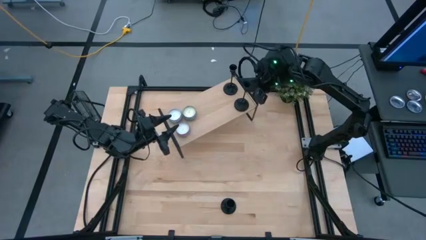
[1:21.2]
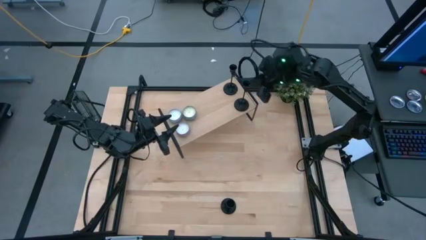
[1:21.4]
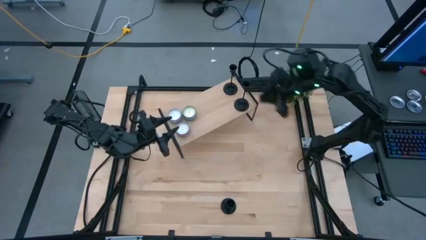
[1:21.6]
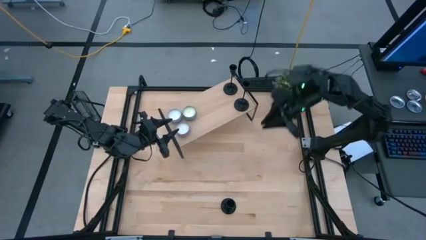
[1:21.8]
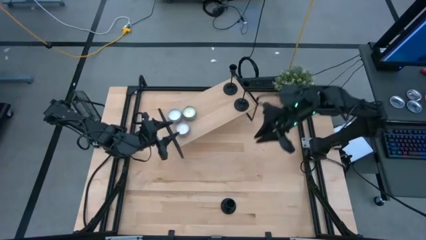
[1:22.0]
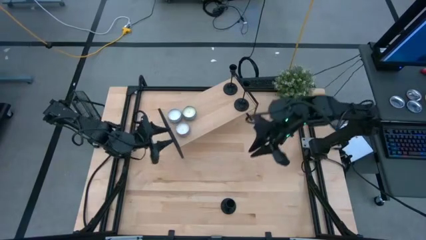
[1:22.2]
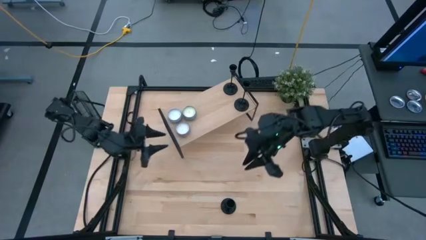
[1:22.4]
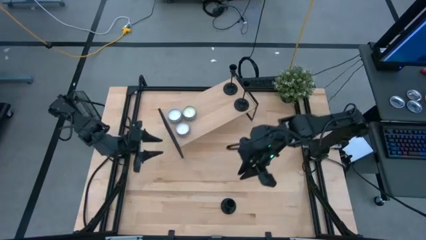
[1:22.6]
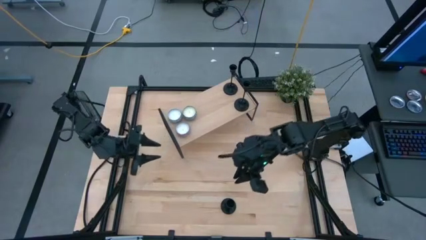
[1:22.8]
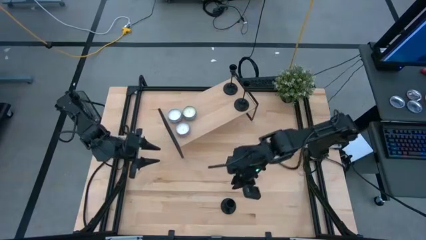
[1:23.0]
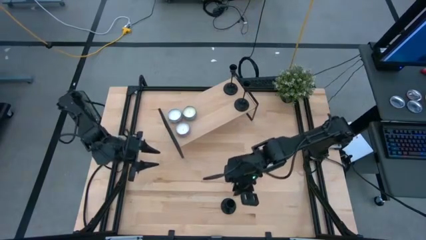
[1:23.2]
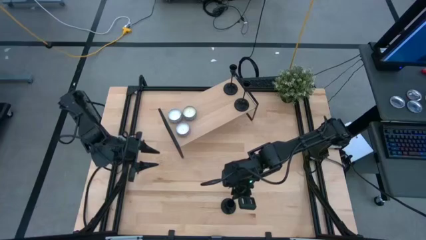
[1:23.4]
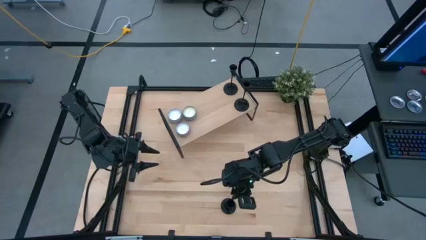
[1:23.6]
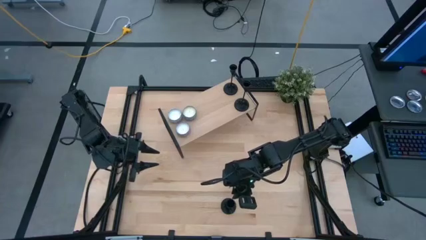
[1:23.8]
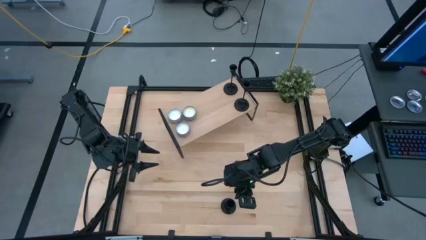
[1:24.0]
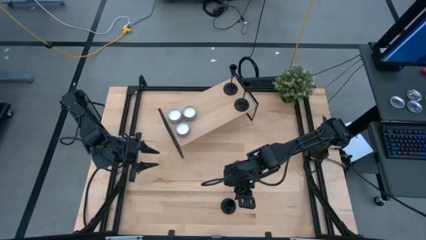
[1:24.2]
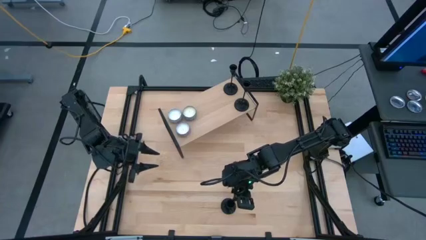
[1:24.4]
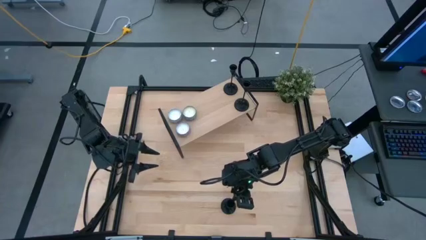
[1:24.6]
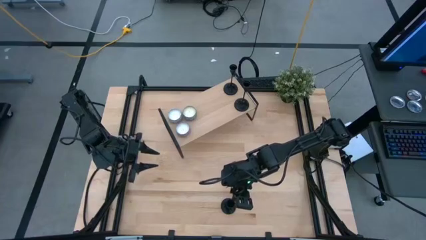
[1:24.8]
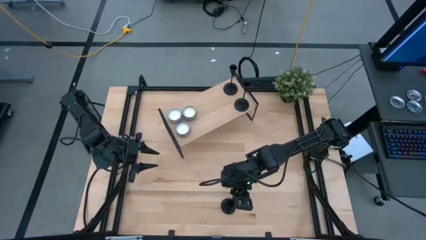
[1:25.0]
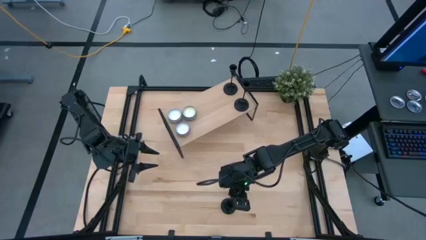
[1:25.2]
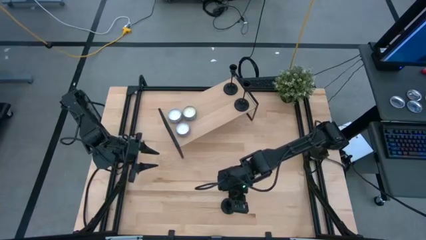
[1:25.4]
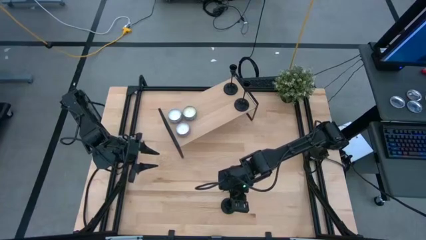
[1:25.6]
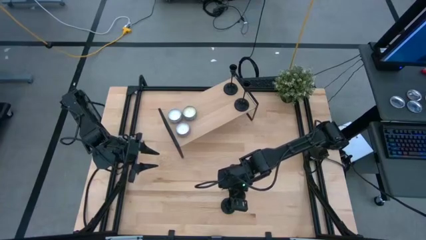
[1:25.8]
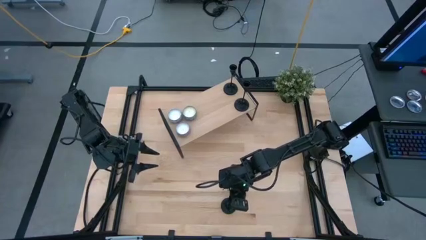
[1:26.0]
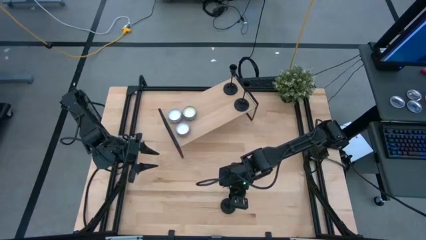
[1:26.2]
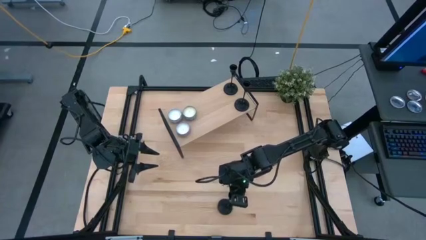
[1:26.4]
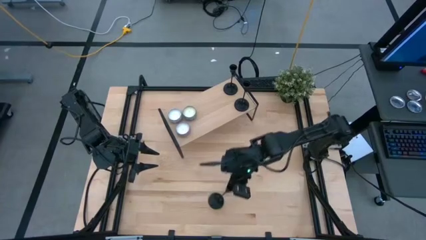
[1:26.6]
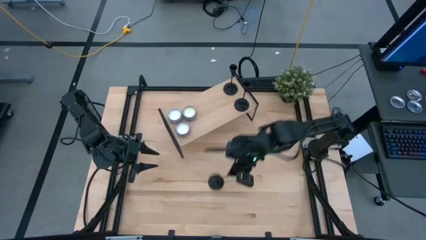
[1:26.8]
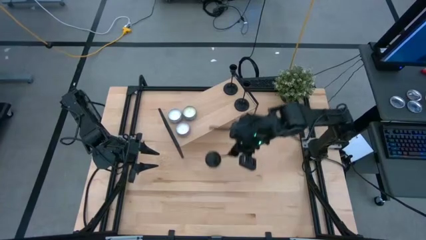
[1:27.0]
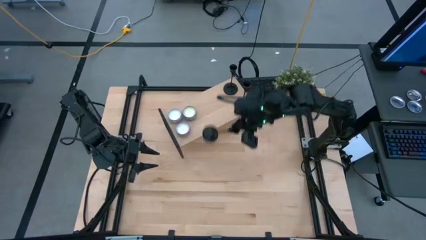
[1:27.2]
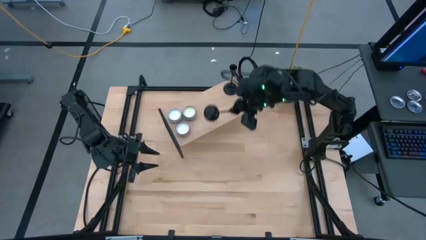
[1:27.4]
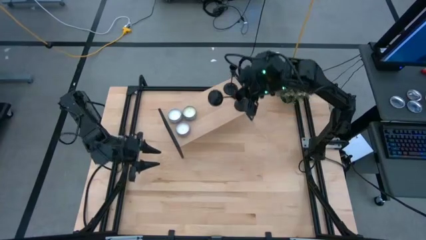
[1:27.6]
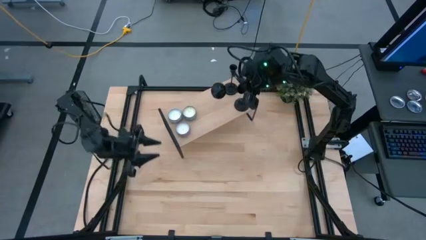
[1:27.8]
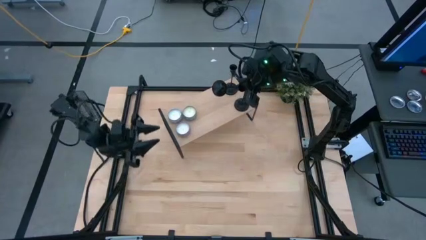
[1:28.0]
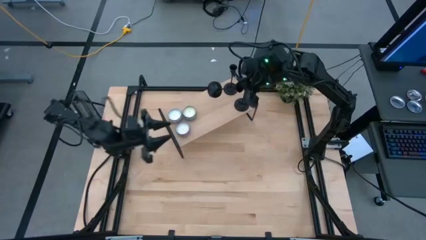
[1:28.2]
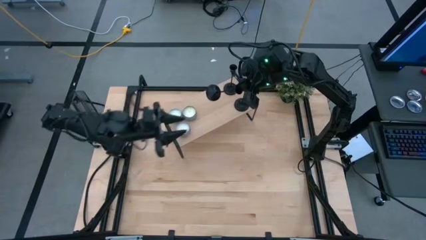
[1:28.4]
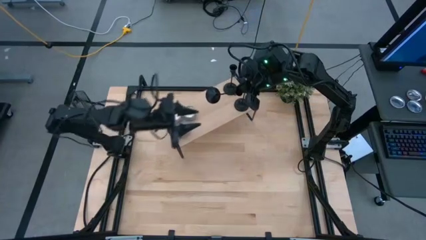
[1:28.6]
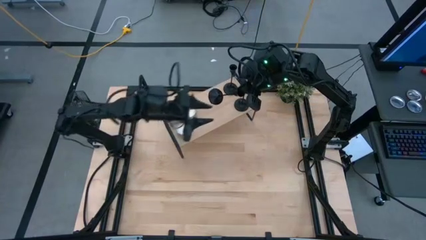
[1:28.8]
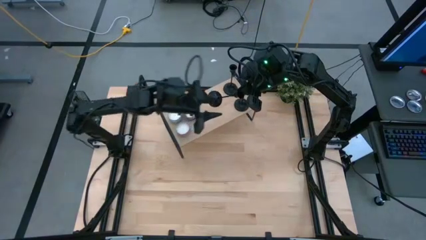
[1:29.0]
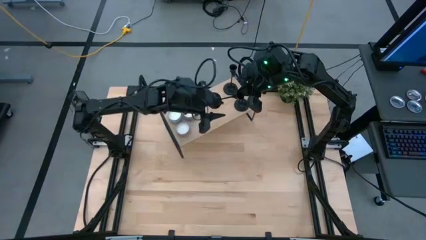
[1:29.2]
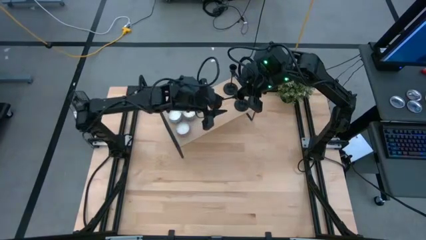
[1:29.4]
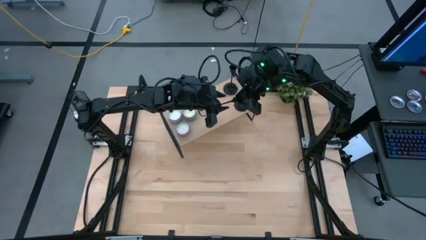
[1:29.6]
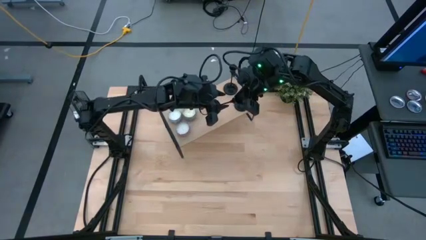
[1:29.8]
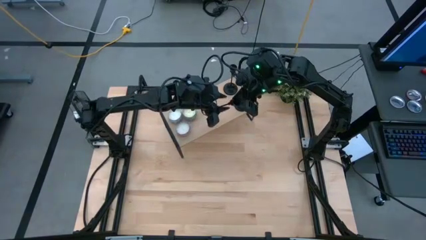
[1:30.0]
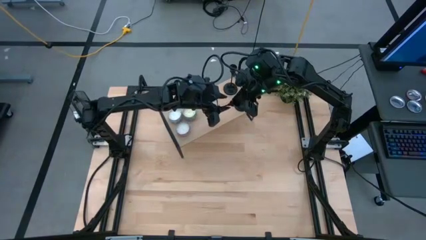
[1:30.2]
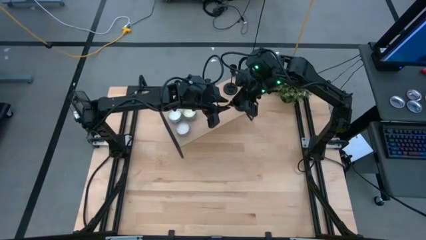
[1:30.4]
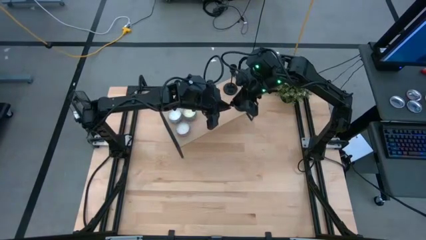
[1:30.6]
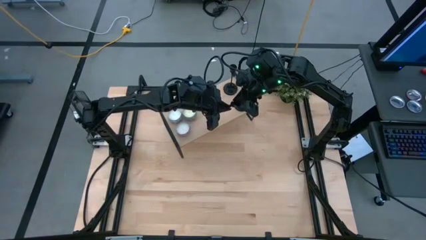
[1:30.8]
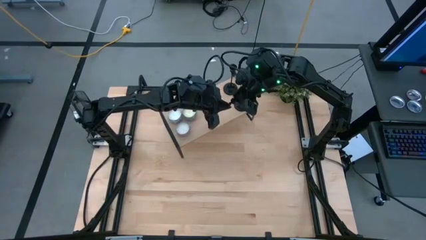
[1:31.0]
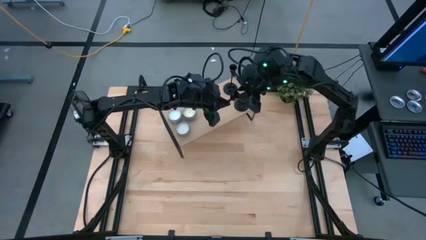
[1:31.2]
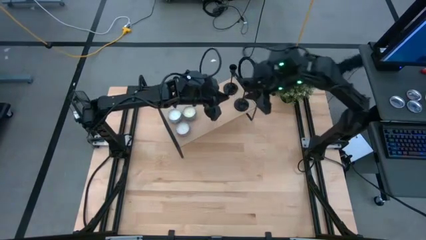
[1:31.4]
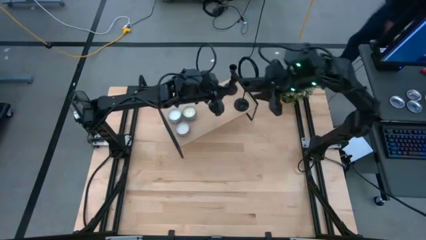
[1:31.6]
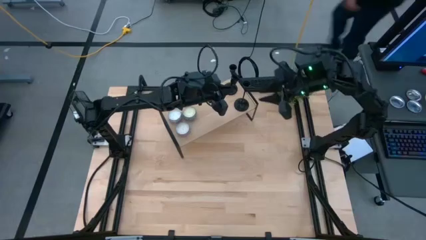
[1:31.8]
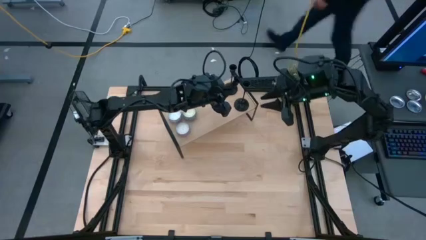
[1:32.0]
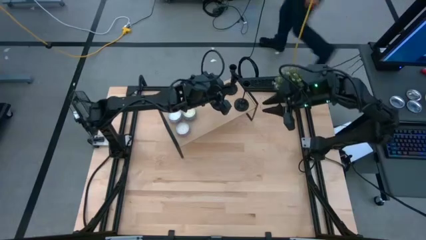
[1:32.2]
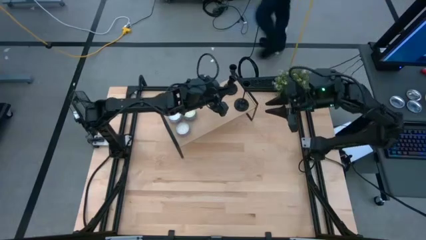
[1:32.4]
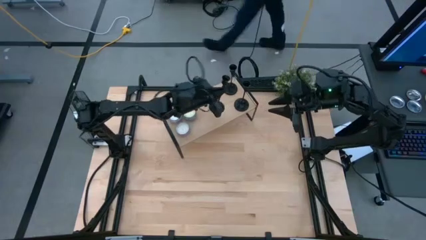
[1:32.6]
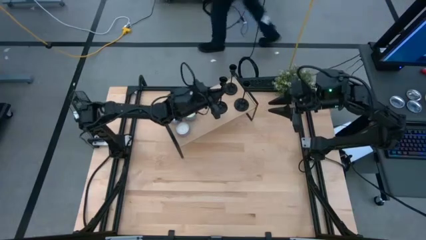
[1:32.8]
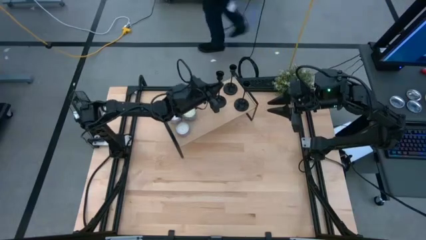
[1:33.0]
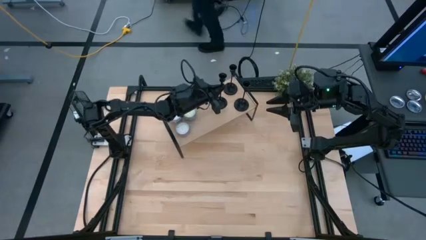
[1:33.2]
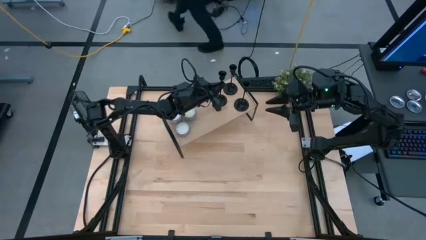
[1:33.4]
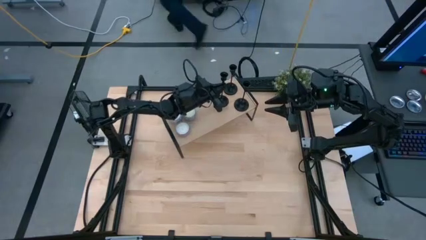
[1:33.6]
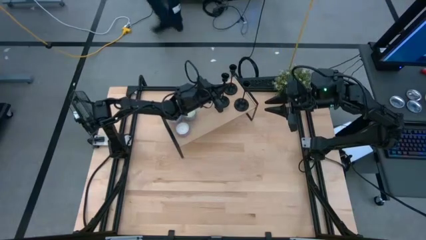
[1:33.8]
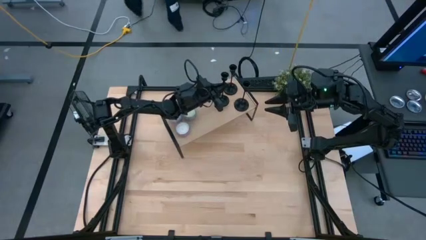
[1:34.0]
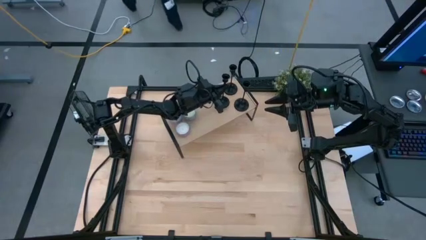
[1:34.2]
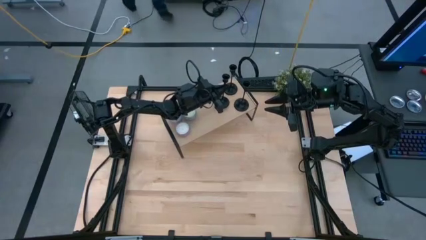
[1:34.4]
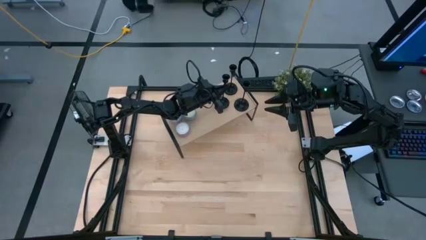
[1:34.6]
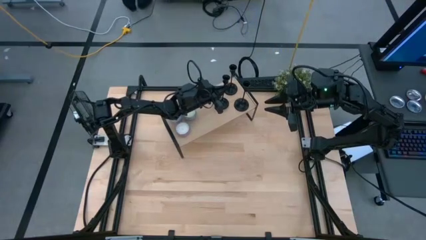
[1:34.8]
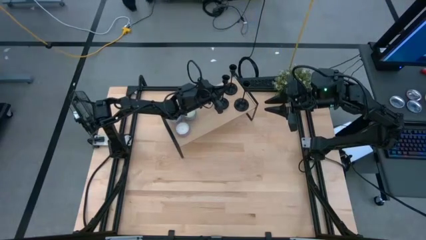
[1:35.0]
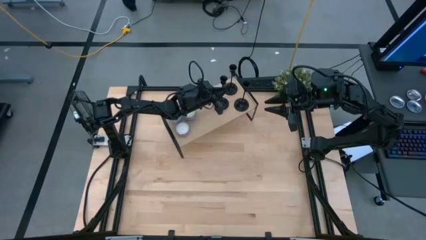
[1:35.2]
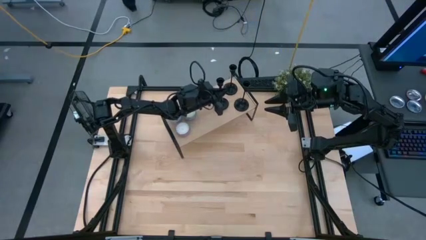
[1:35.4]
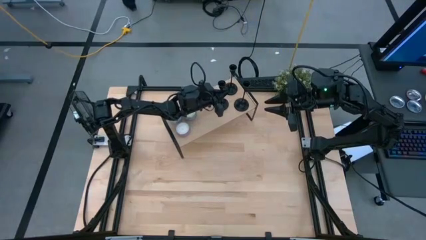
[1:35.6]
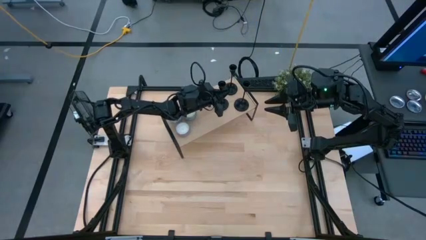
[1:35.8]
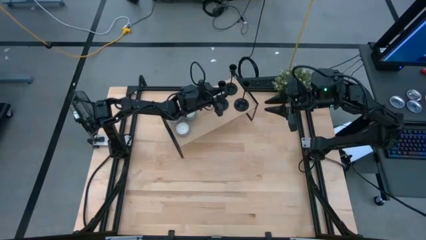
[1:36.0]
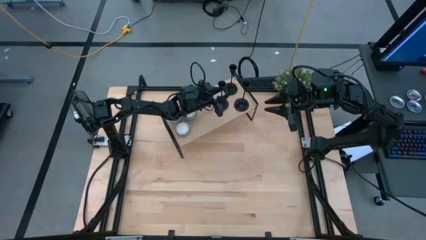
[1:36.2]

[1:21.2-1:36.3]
Task: Pick & Place candle stick holders
Put the black candle holder on the shelf

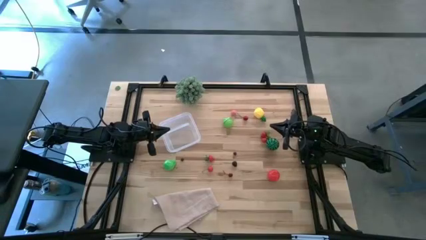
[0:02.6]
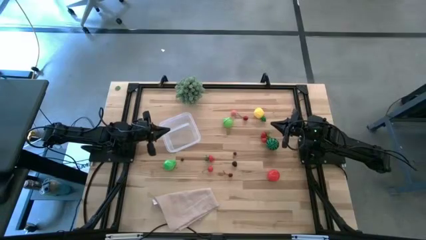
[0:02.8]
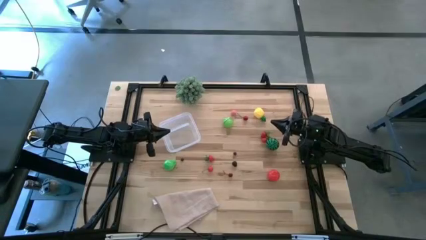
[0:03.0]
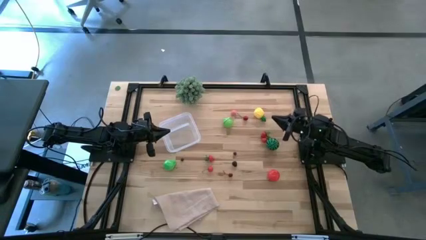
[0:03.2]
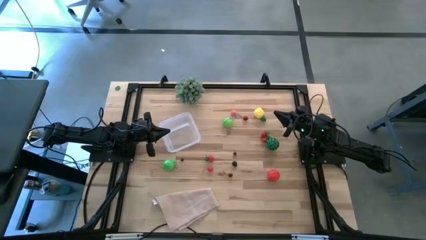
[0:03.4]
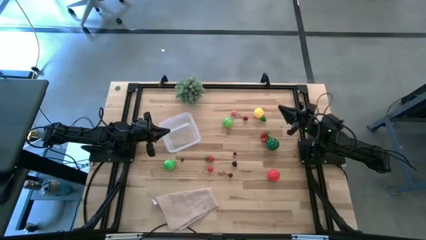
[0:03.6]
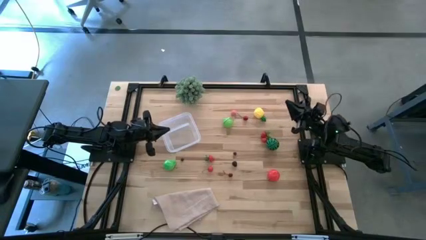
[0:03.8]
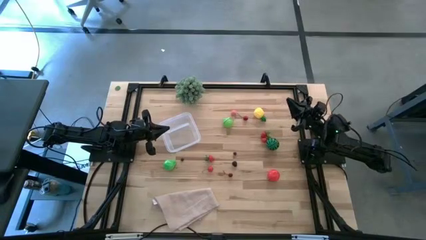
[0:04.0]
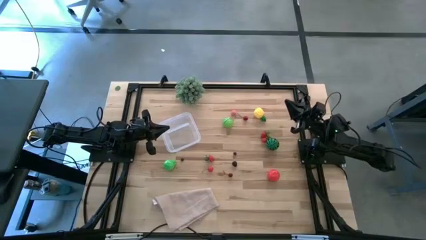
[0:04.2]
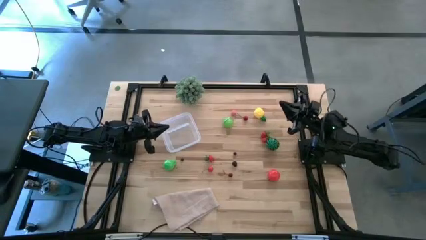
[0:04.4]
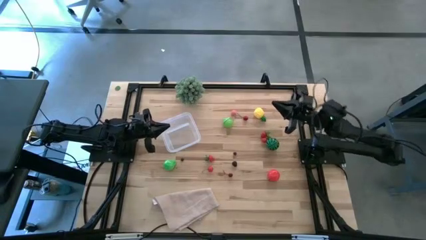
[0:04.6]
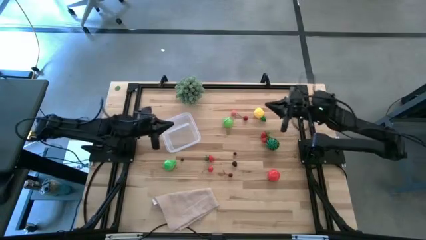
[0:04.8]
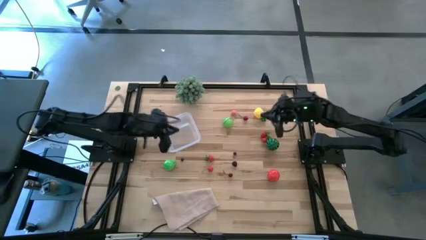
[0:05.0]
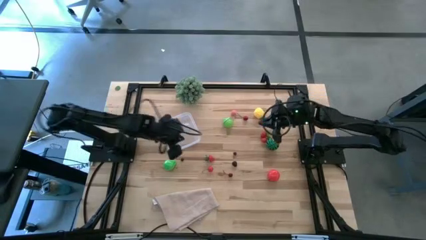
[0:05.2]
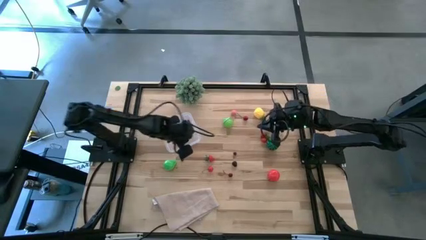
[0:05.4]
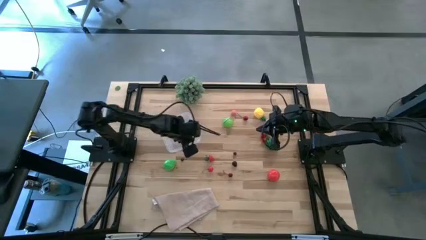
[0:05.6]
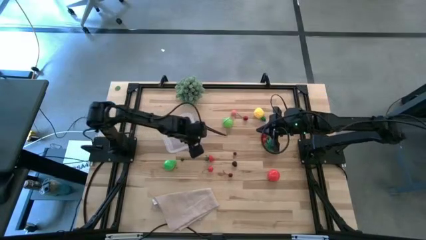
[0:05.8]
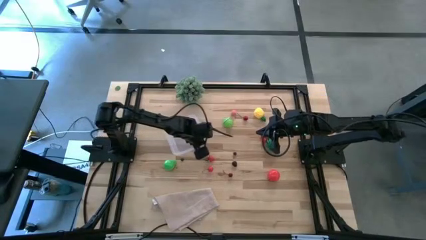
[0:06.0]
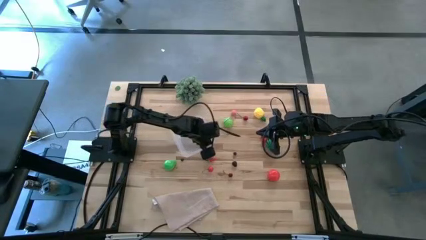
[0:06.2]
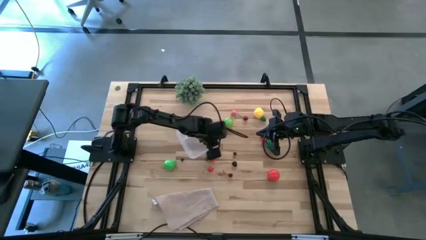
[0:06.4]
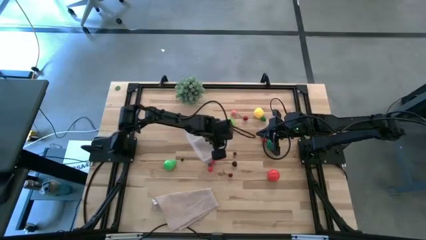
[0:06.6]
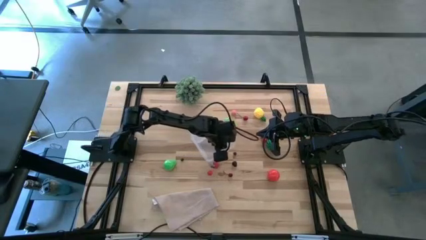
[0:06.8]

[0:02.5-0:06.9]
Task: Pick and placing Produce into tupperware
Move the transparent bin to the center of the table
